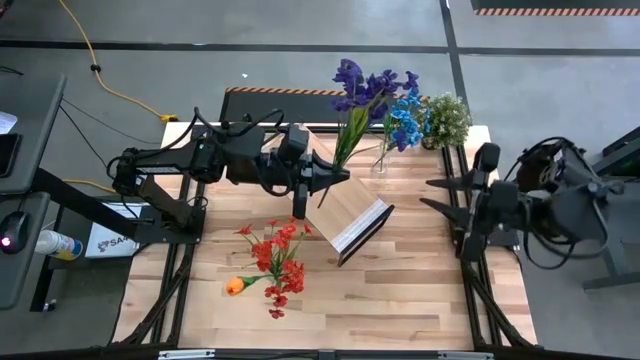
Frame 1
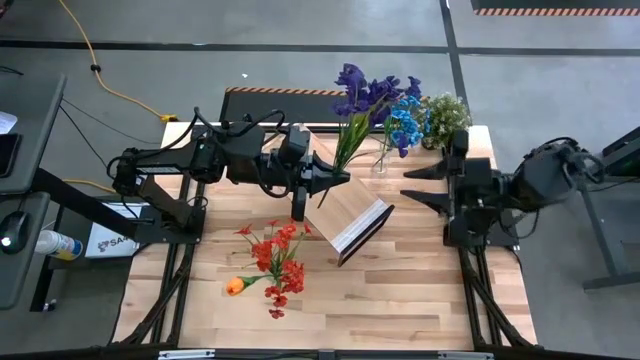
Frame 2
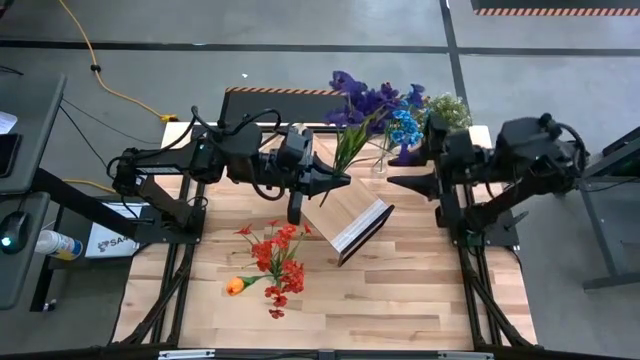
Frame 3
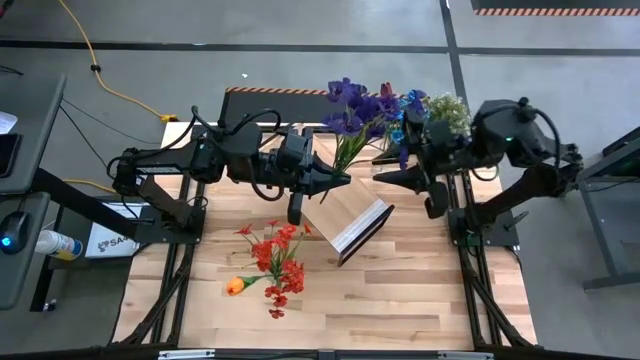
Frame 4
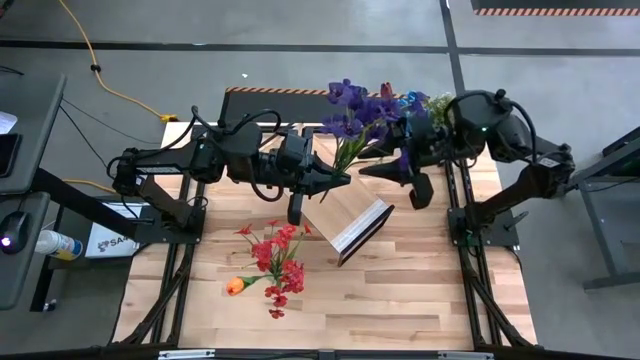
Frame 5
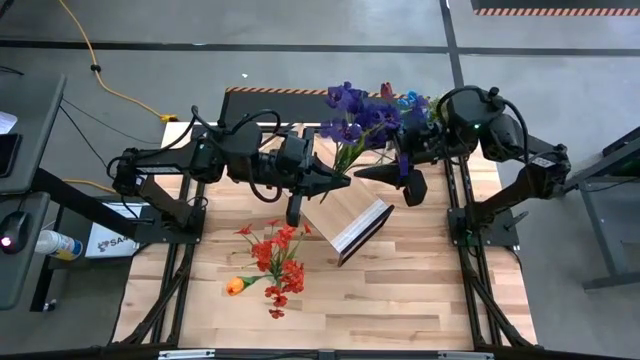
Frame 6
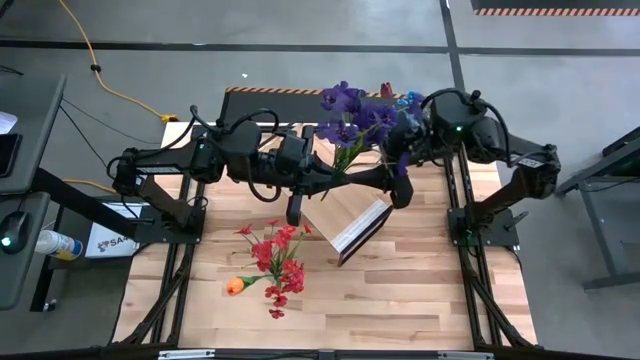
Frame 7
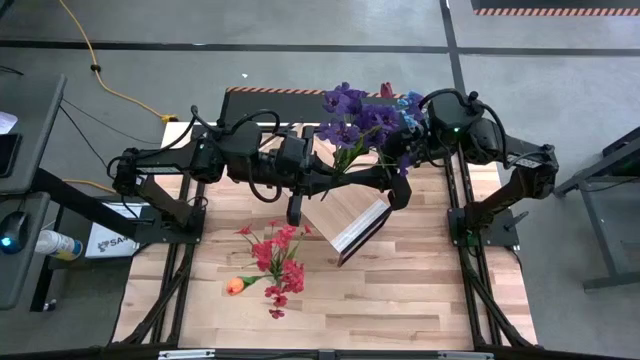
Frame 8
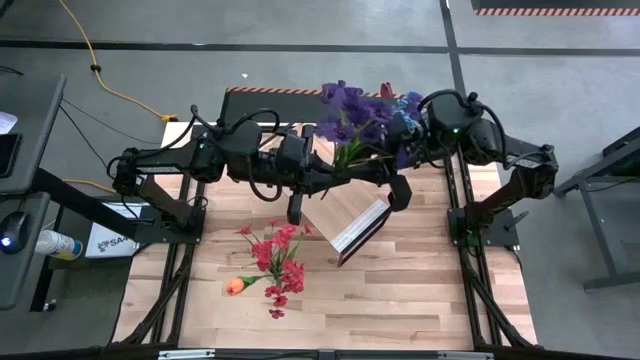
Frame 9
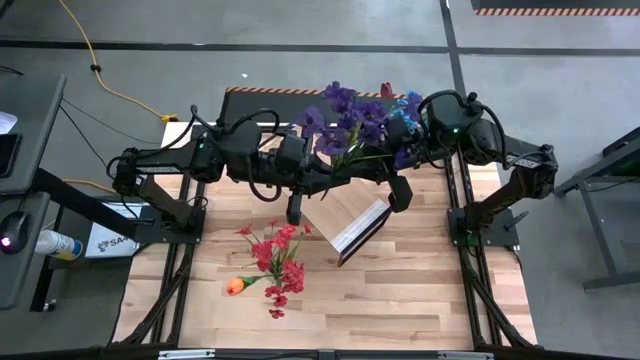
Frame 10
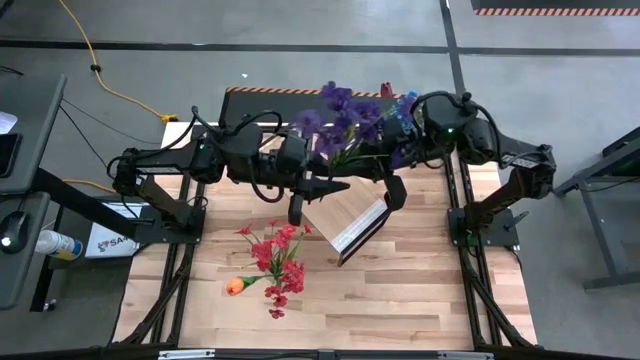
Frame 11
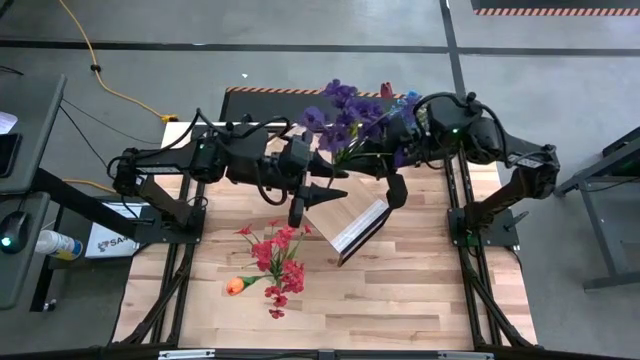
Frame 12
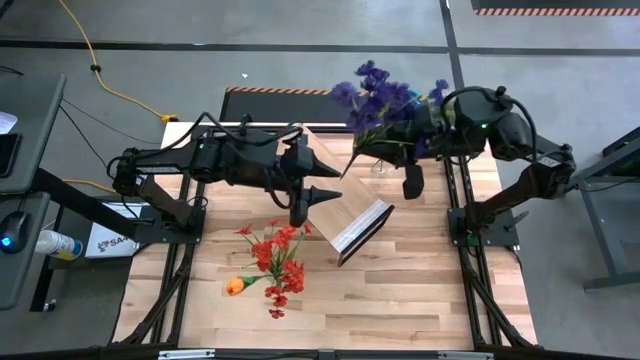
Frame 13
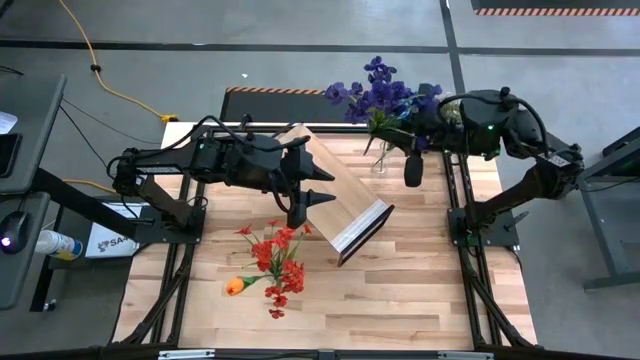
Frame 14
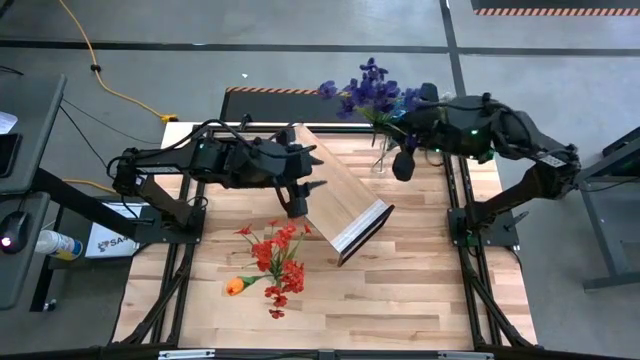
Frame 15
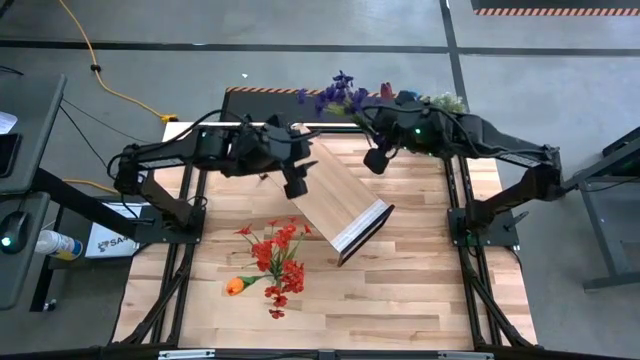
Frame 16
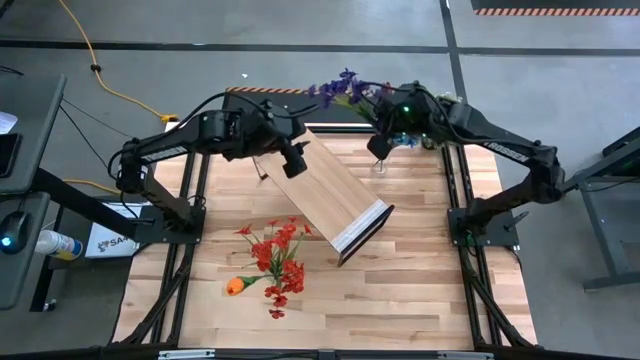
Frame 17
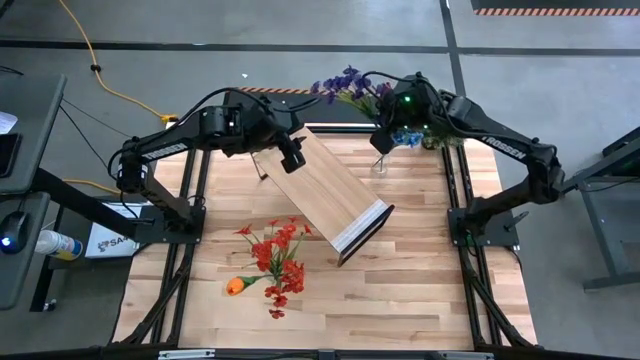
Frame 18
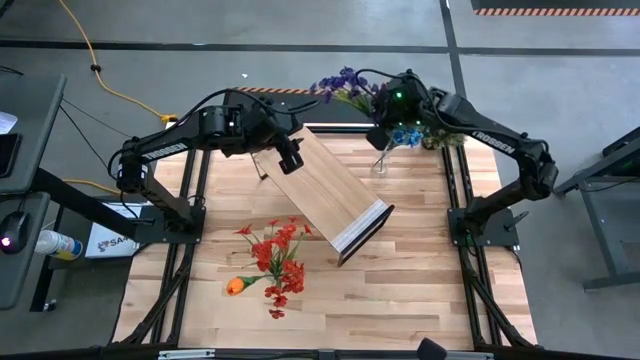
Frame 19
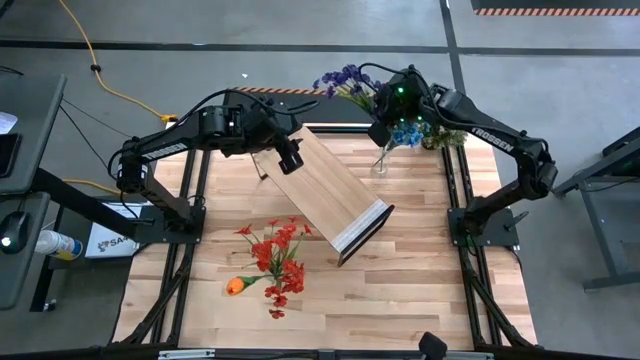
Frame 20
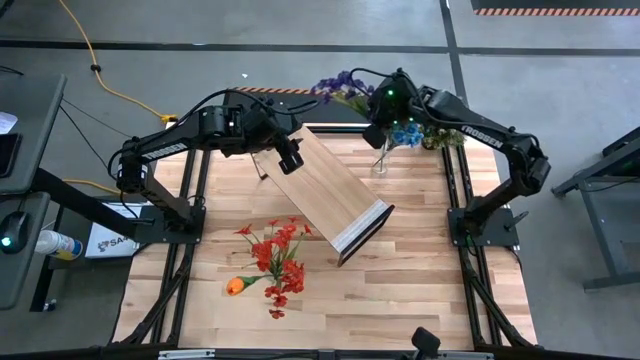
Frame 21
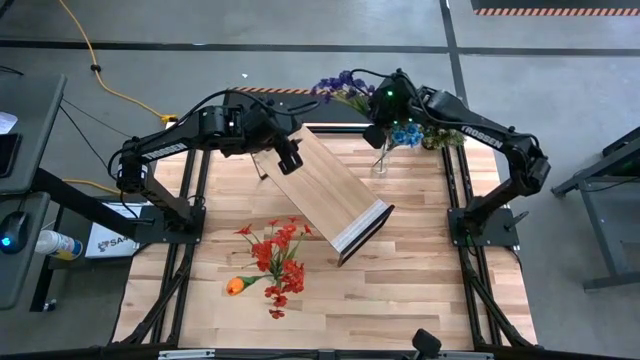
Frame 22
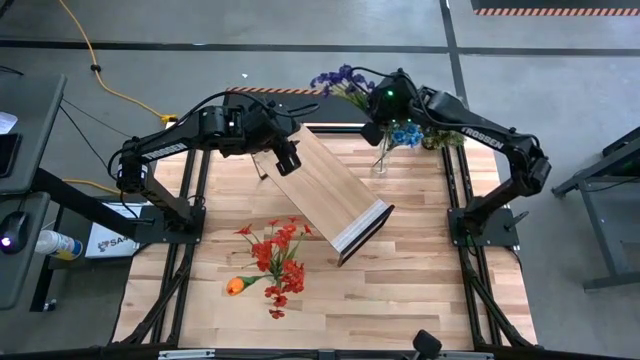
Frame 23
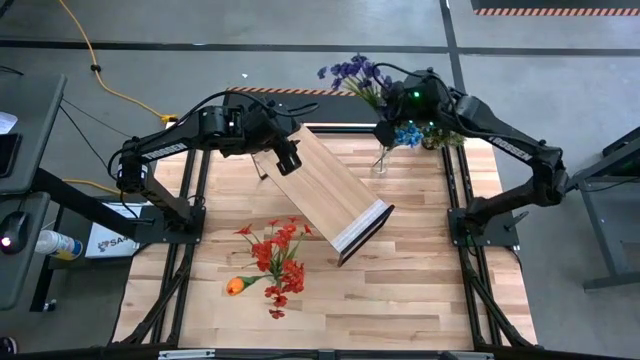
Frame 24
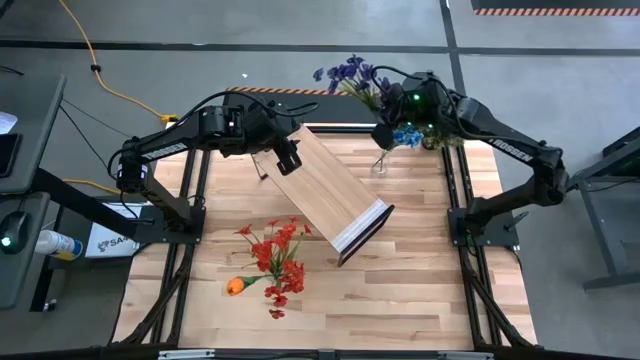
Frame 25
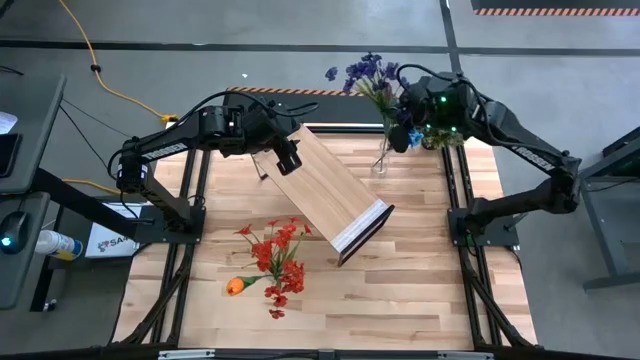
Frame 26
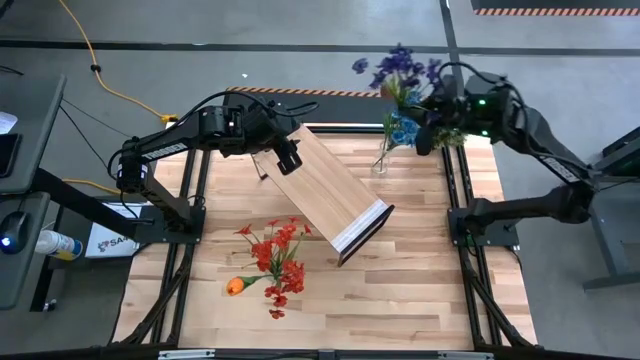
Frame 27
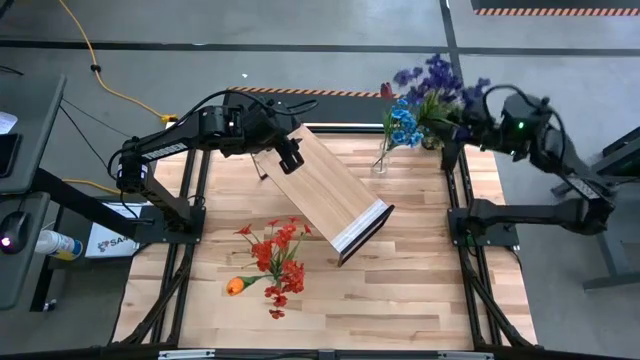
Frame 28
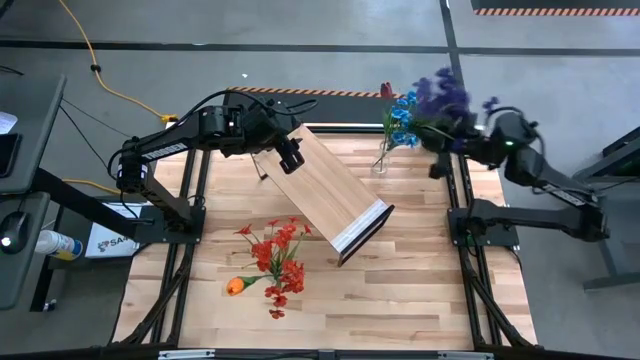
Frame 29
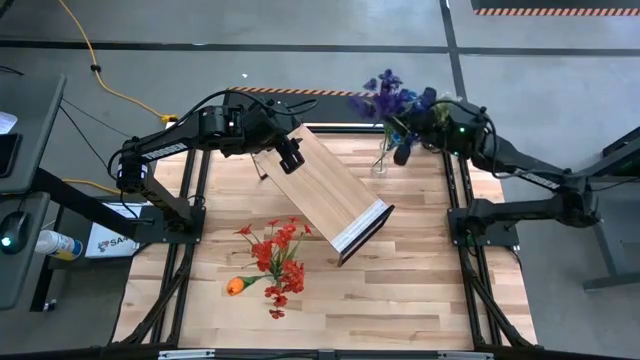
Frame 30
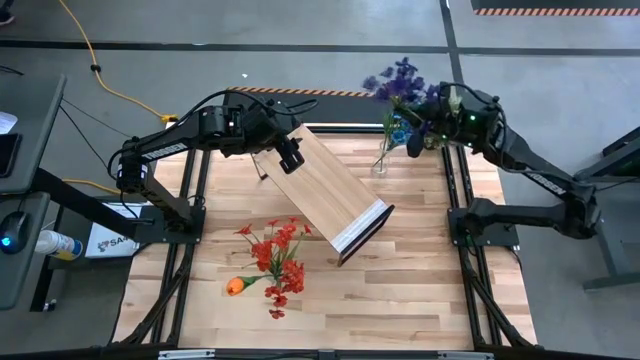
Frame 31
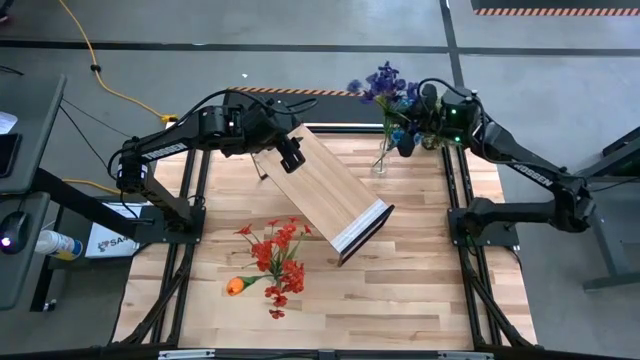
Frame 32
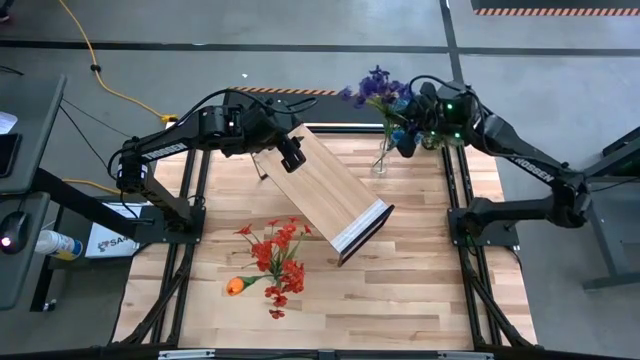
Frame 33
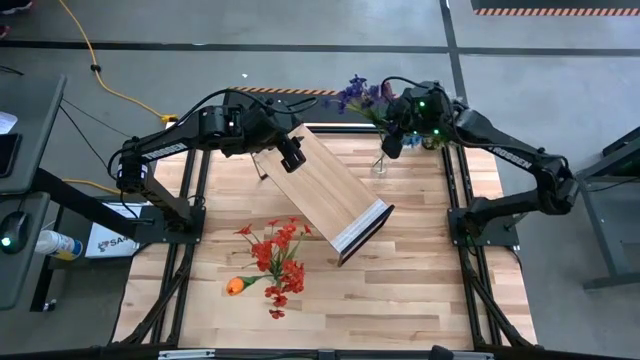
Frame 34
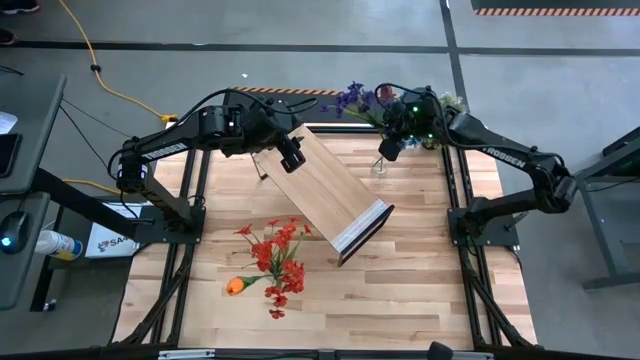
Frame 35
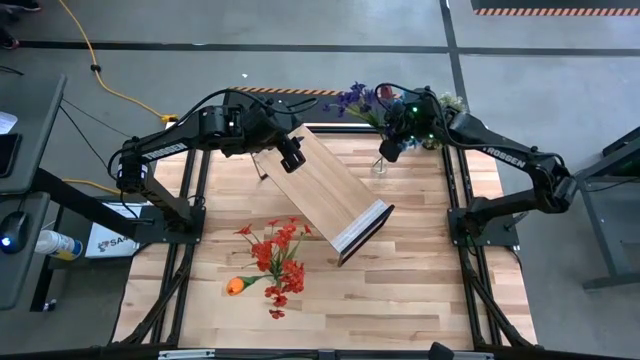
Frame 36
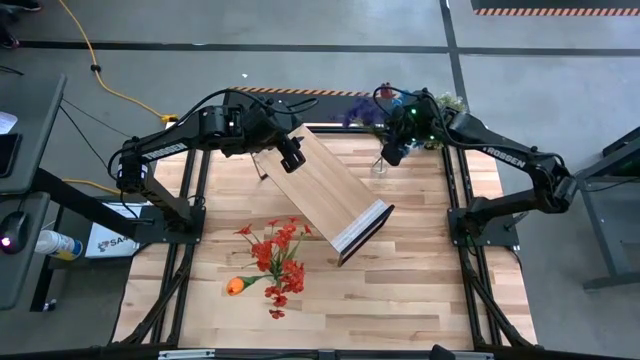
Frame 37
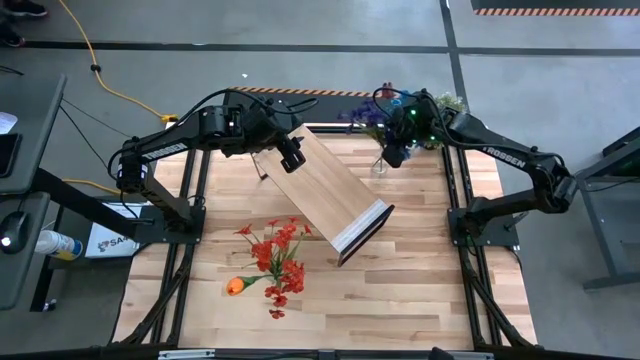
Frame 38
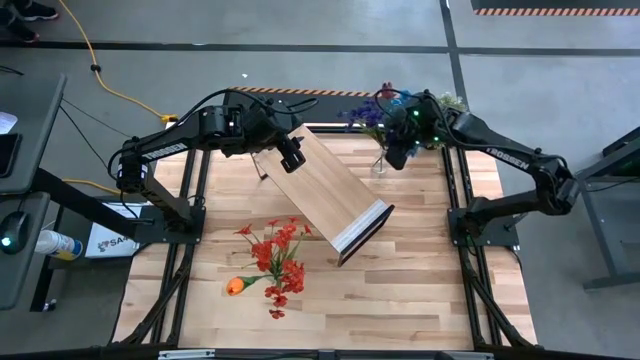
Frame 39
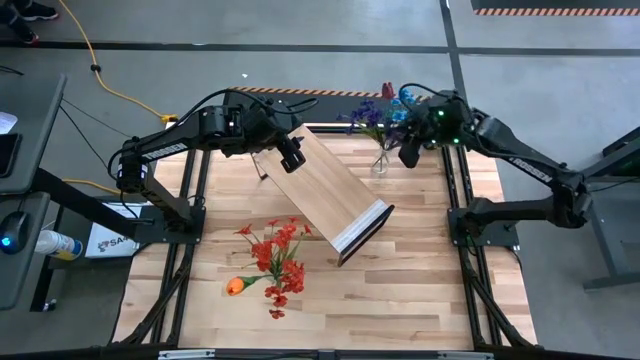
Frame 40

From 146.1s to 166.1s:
Task: Pick and place flowers into a vace then onto a shelf
Put the violet flowers into the top transparent vase

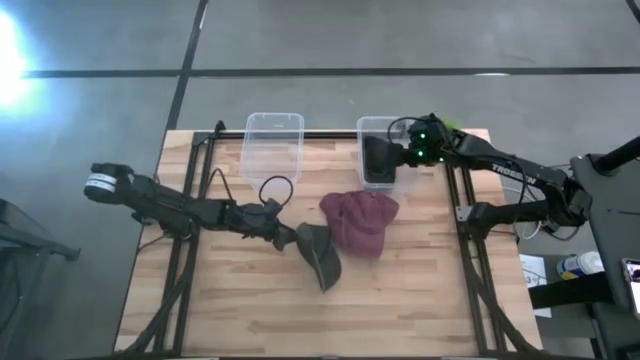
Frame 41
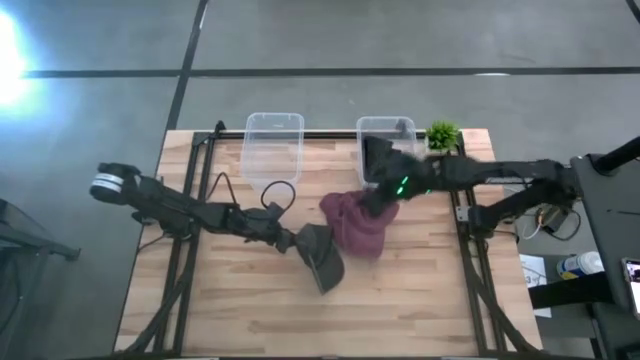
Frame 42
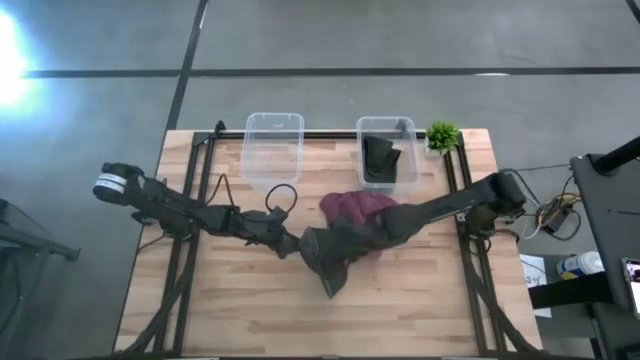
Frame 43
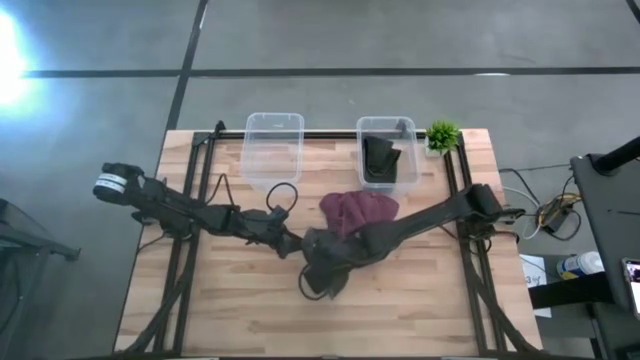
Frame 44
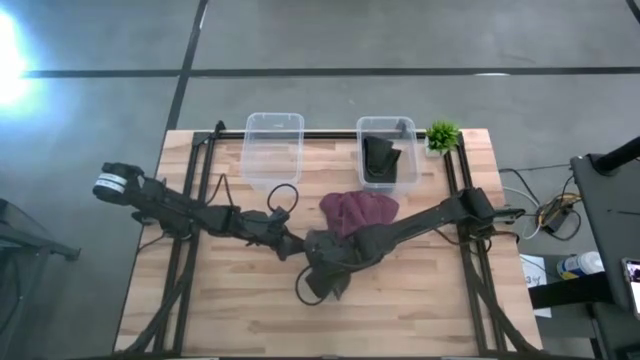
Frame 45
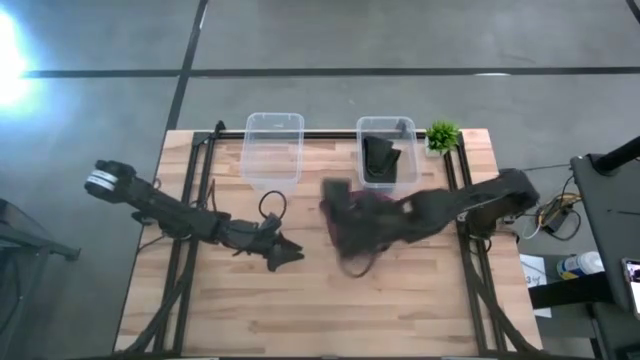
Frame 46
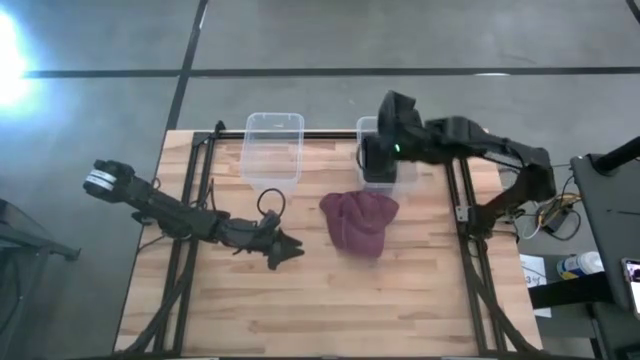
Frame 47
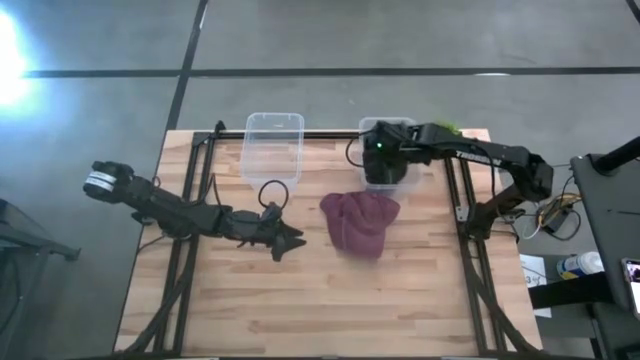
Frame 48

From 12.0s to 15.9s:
Task: Pick & Place hat
Put the black cap into the right transparent bin
